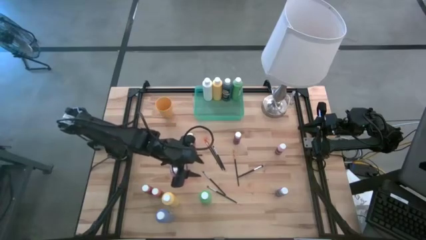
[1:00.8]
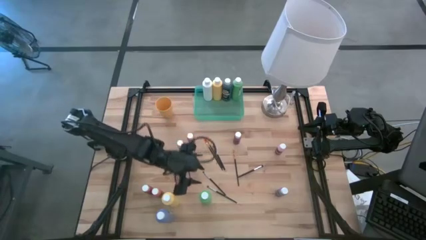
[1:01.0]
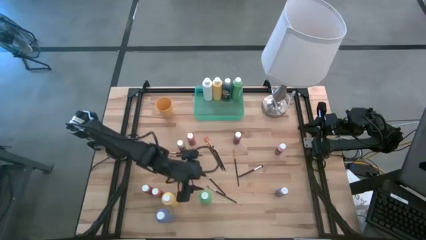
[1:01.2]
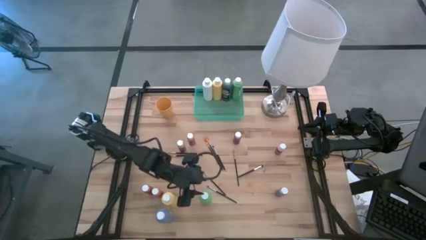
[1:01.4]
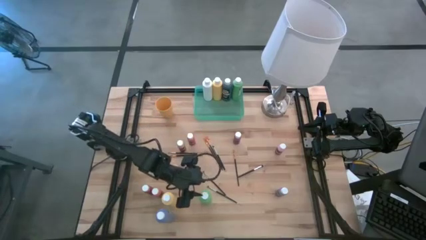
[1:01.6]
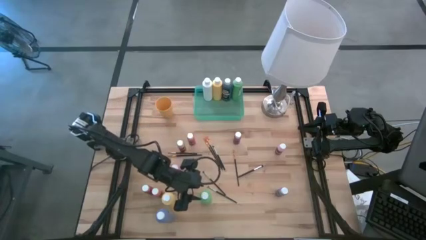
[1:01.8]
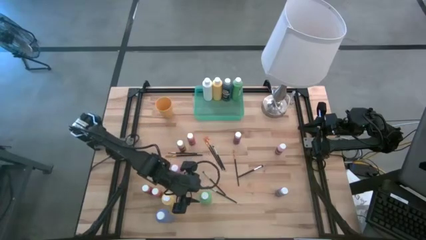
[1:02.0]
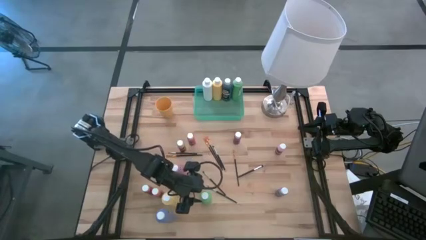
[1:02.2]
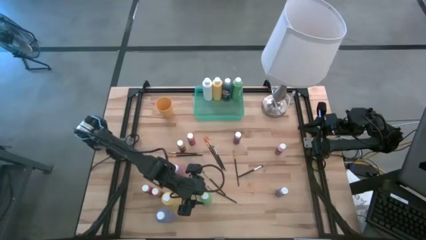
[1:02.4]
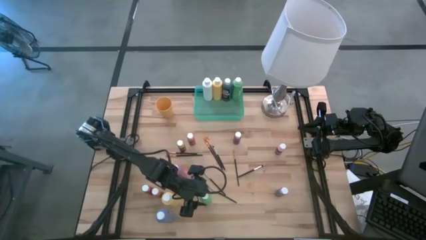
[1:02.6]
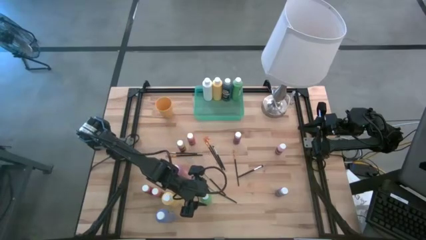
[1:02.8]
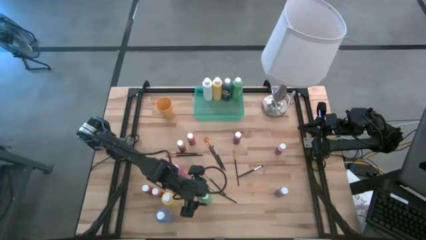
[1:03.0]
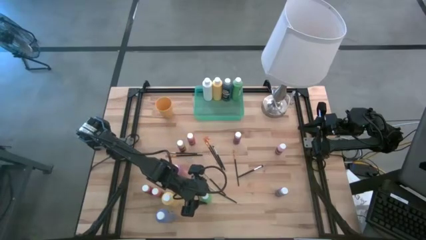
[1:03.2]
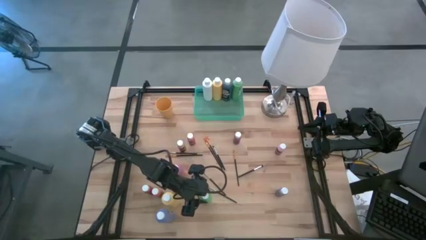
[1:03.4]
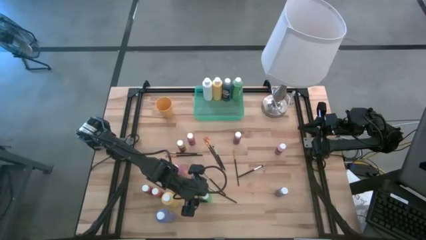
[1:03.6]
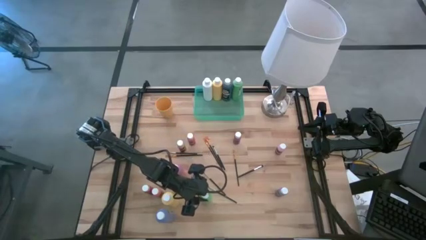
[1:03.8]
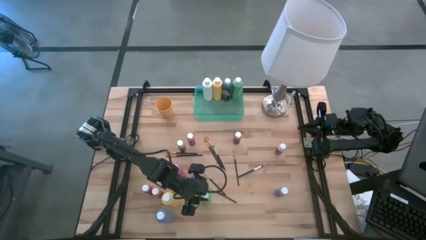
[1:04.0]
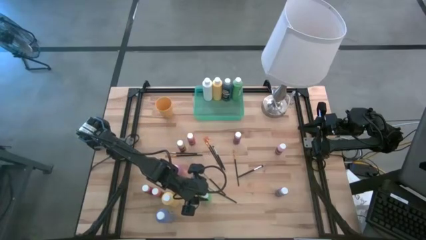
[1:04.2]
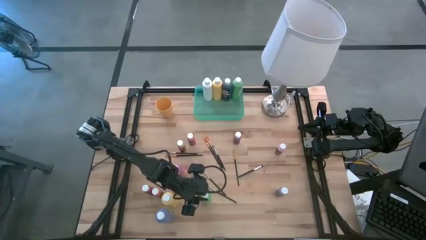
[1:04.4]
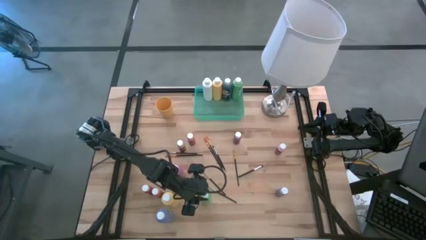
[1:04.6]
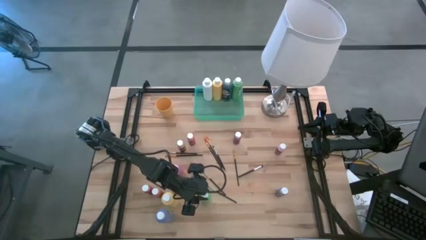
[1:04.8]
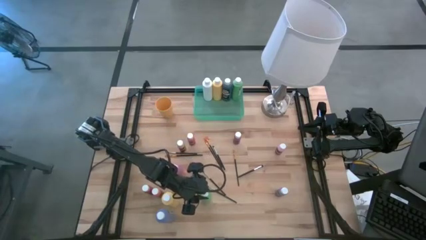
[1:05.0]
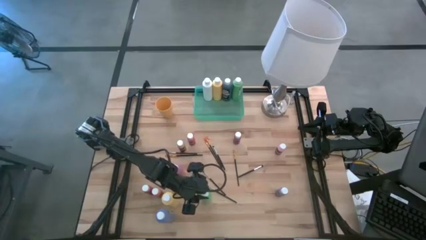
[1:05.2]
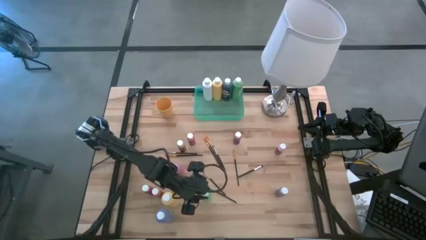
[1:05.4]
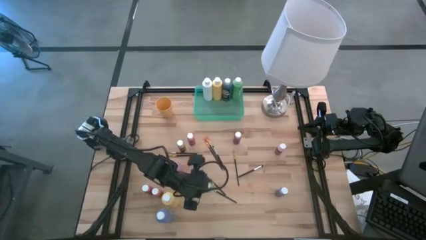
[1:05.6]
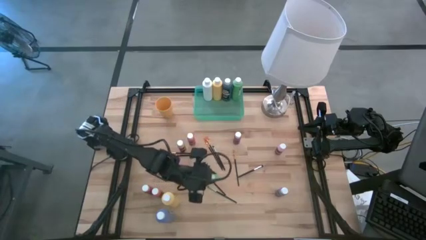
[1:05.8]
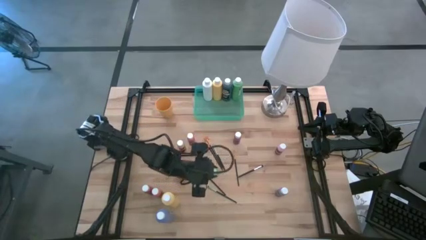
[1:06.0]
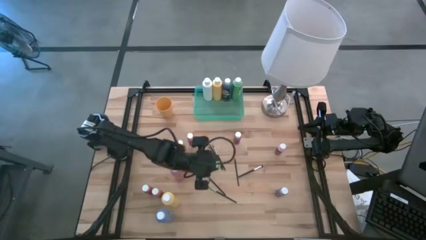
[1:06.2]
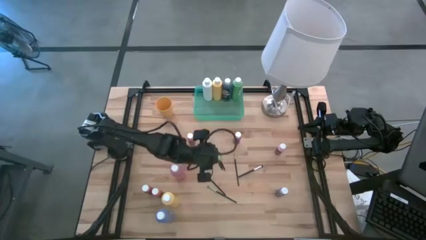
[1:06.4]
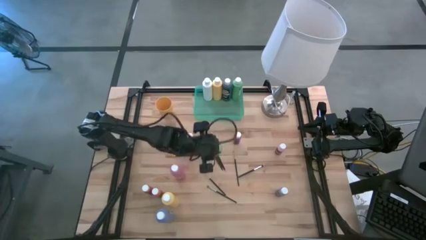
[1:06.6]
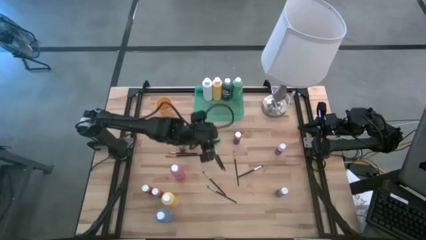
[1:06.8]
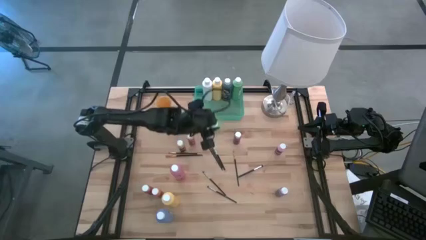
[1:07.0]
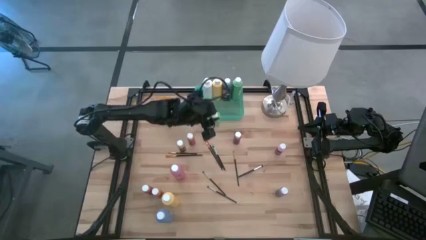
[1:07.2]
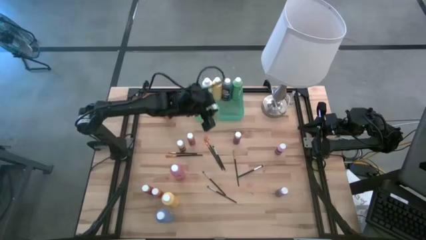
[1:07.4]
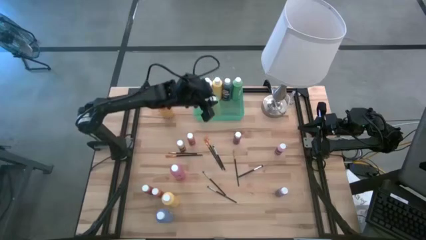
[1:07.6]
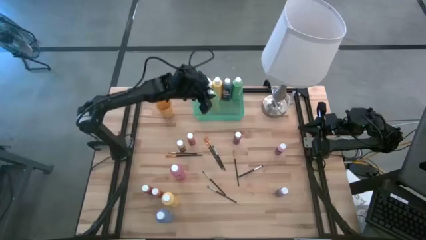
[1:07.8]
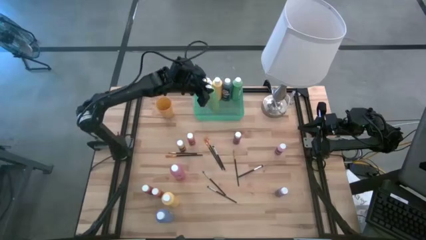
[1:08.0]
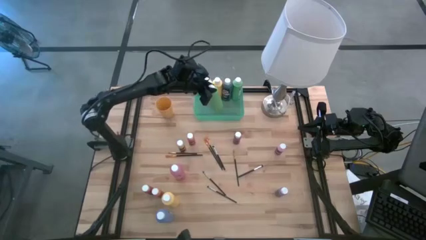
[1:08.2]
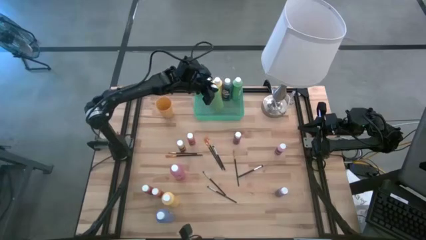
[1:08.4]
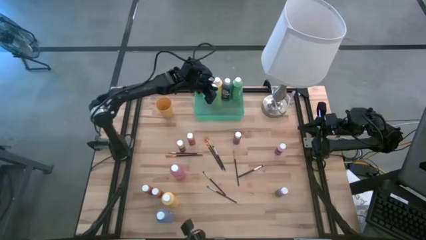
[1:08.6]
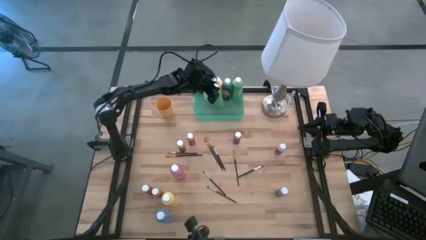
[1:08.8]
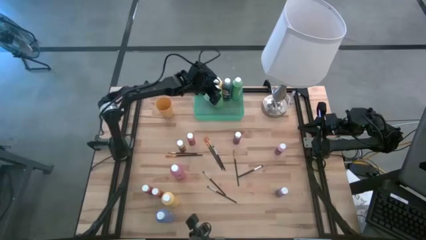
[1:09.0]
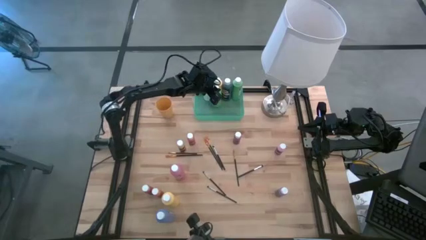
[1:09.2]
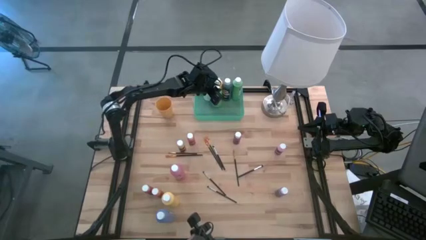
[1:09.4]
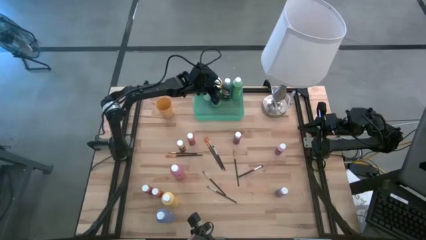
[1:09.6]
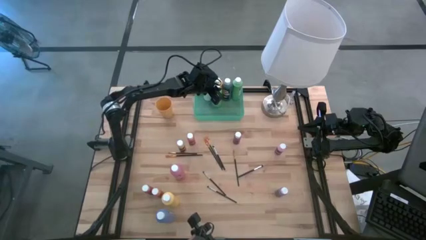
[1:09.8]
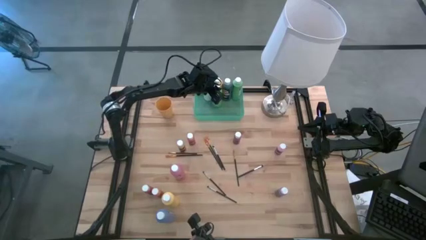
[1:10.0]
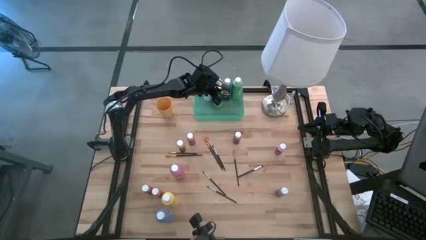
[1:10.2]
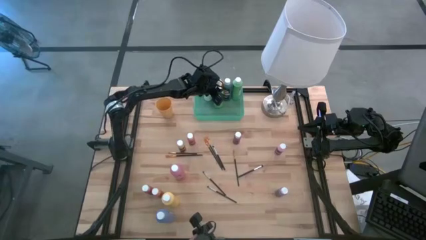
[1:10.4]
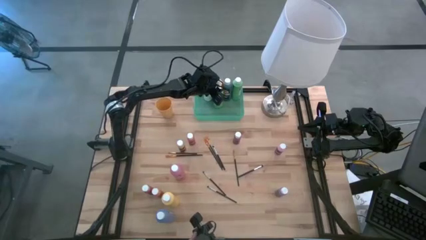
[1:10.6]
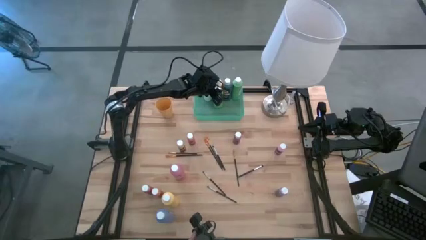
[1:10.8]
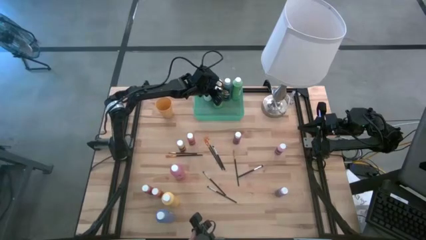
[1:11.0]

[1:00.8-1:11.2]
Task: Pick & Place Paint Supplies
Put the large green paint bottle into the green bin
